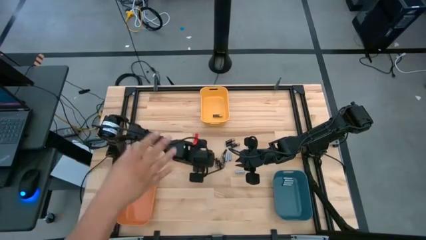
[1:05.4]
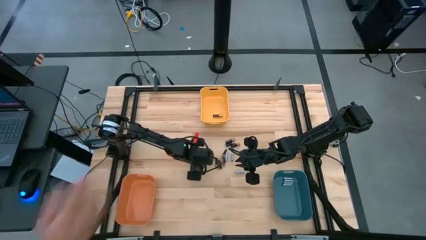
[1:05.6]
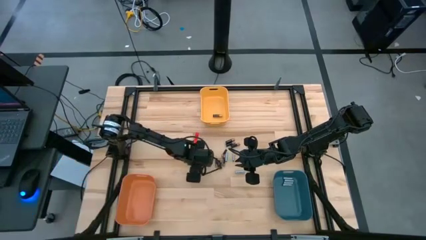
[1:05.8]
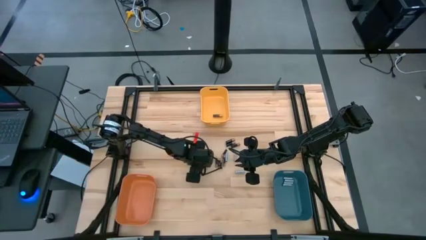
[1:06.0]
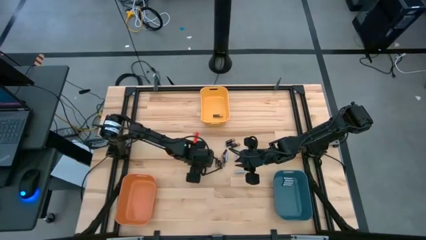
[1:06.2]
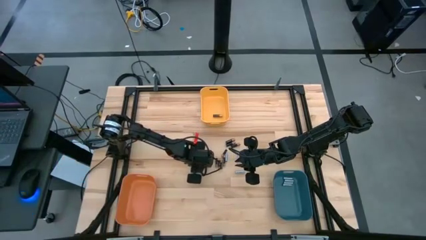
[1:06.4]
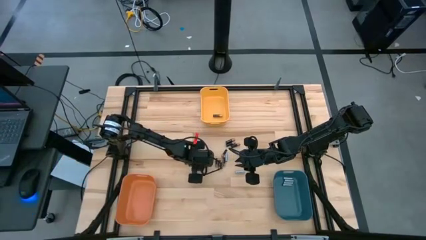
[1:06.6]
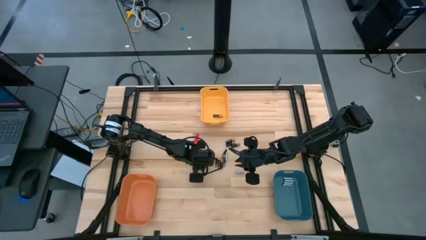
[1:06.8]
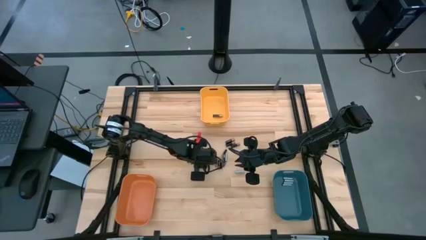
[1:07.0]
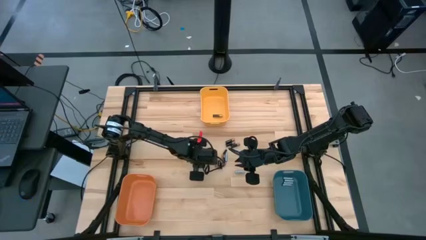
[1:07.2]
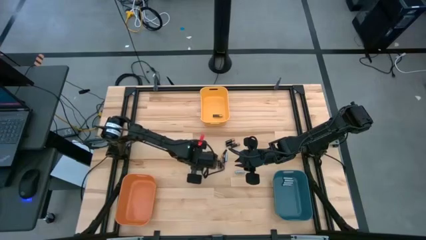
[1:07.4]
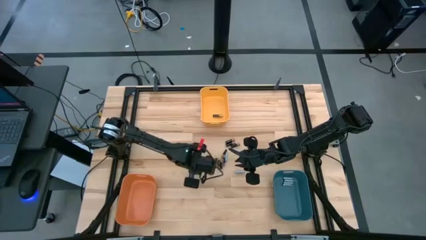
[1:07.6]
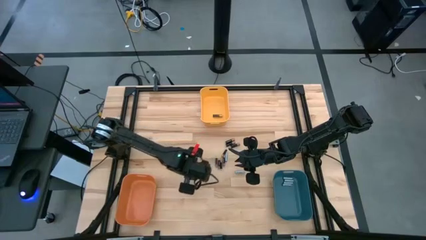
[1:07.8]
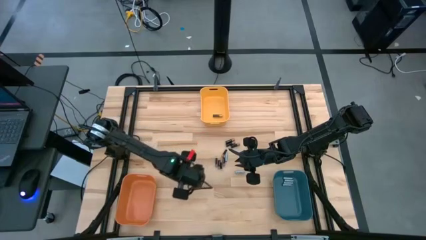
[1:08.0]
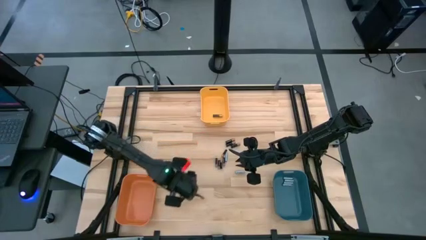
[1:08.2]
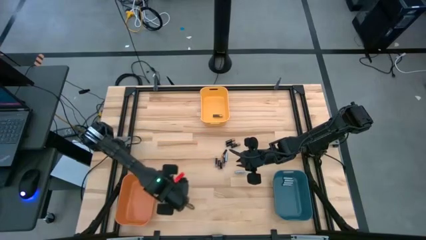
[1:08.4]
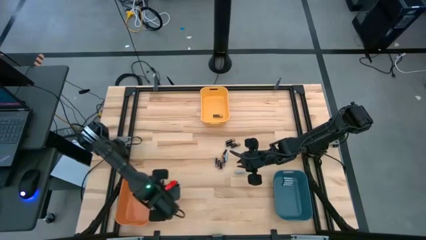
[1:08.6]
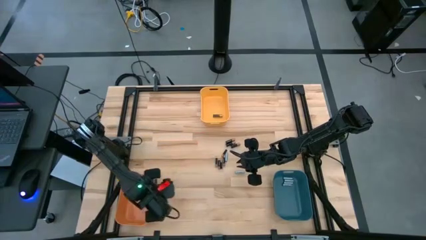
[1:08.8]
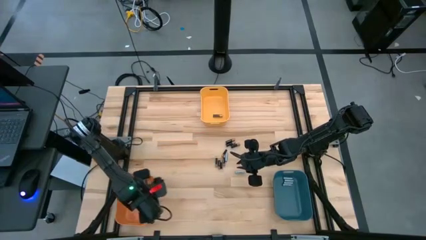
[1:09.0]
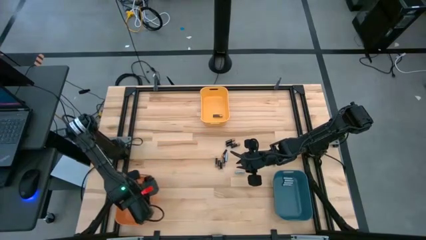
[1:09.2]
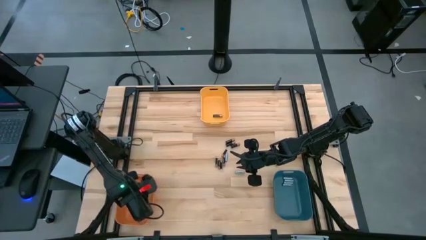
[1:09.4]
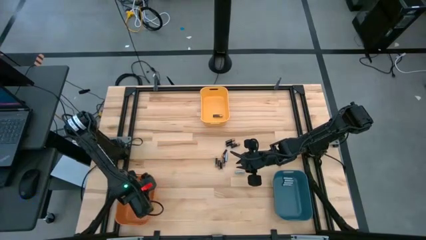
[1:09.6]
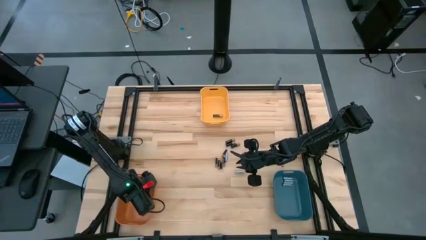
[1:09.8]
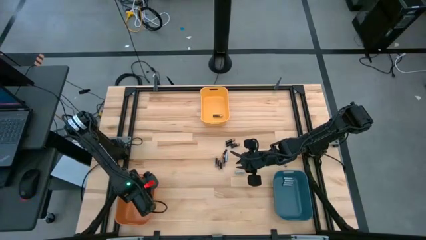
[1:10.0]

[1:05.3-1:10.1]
Task: Sort batteries
Put the small black battery into the yellow bin

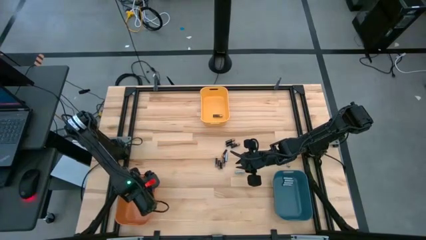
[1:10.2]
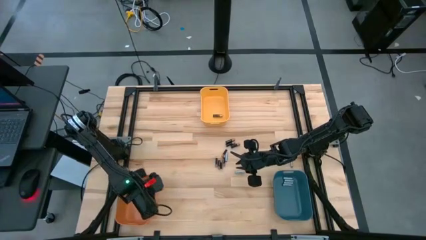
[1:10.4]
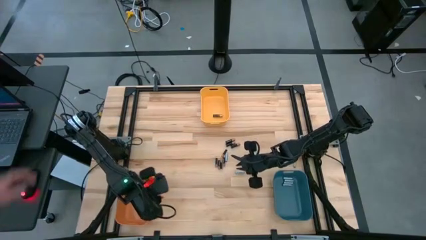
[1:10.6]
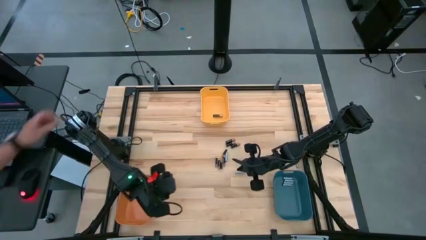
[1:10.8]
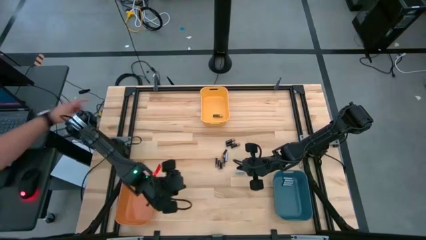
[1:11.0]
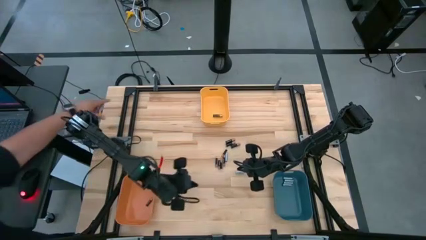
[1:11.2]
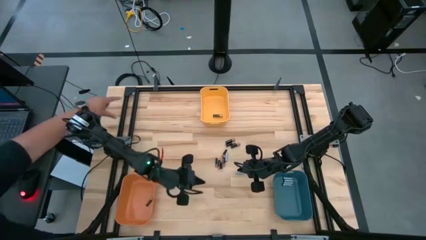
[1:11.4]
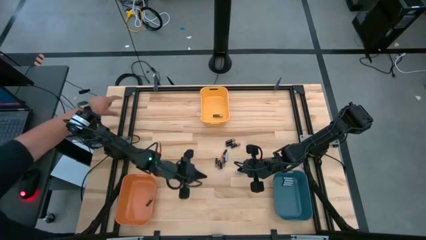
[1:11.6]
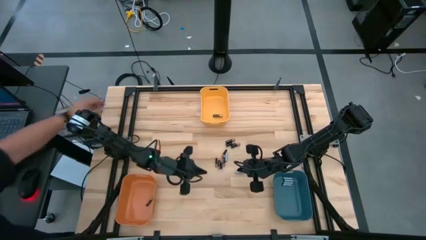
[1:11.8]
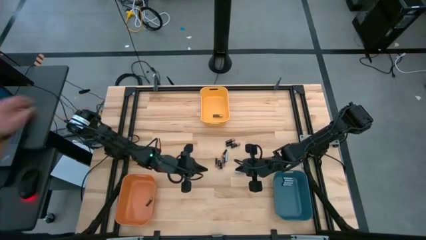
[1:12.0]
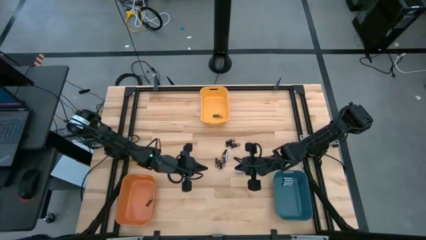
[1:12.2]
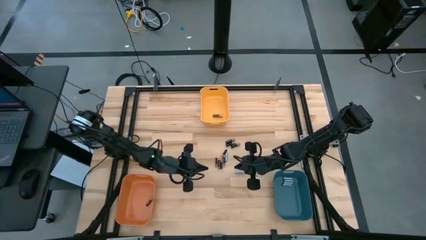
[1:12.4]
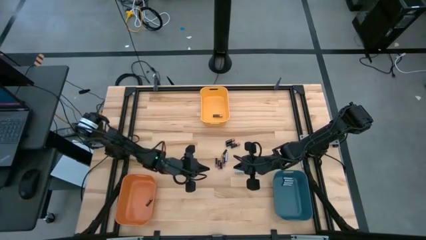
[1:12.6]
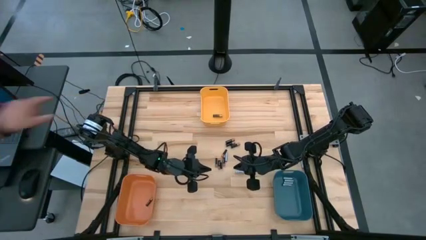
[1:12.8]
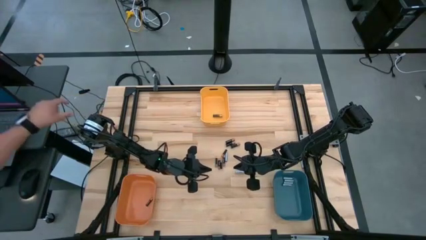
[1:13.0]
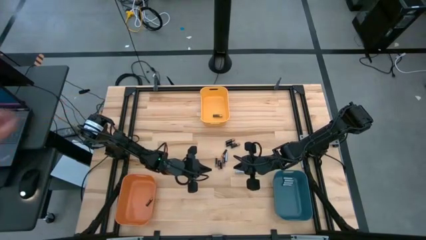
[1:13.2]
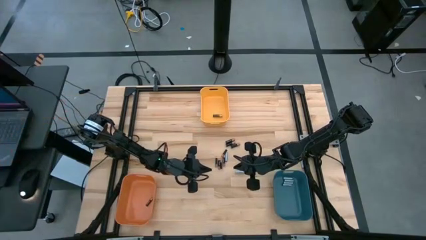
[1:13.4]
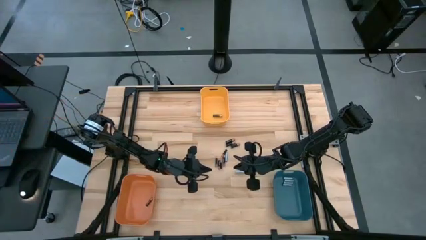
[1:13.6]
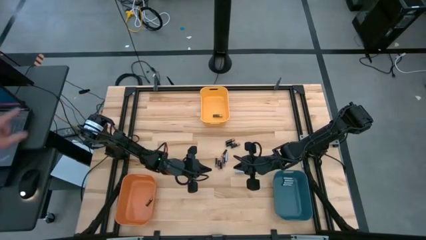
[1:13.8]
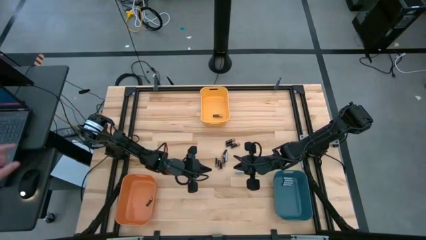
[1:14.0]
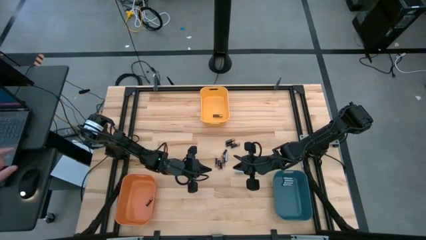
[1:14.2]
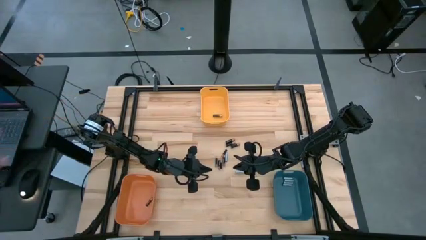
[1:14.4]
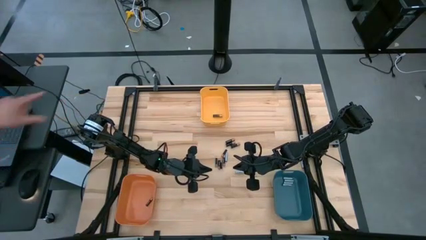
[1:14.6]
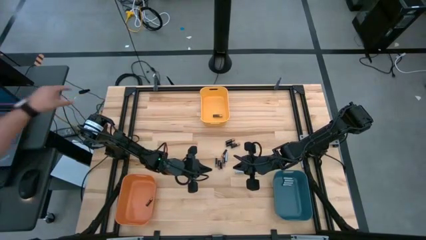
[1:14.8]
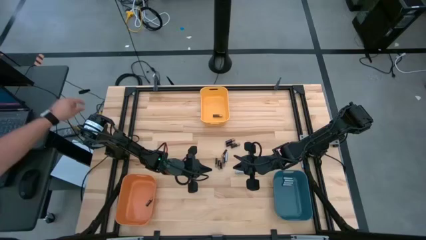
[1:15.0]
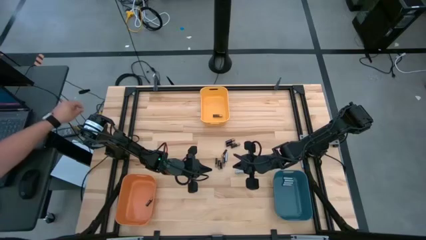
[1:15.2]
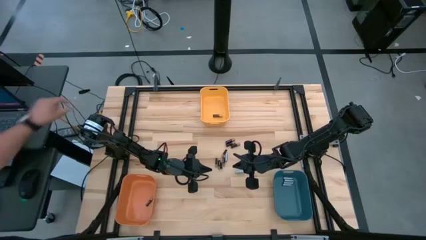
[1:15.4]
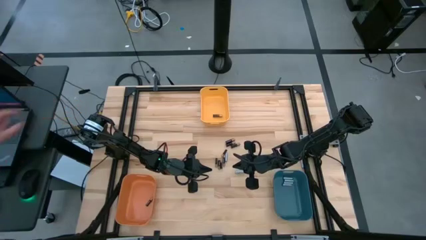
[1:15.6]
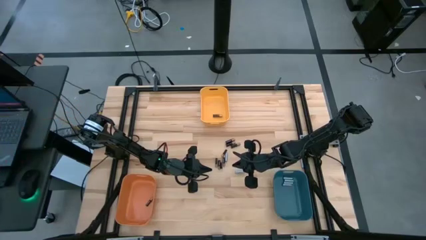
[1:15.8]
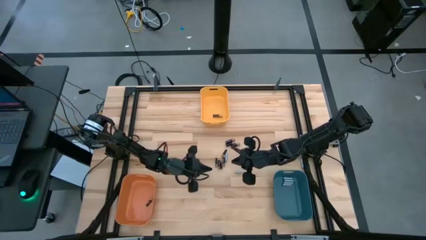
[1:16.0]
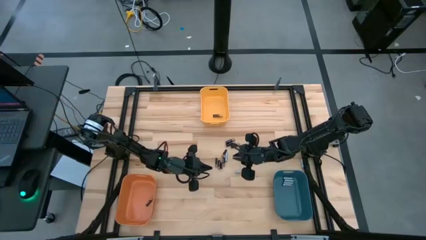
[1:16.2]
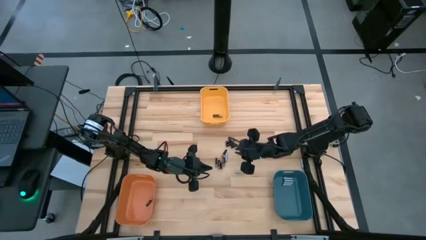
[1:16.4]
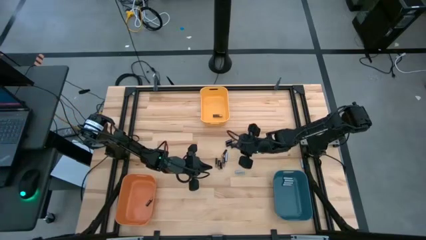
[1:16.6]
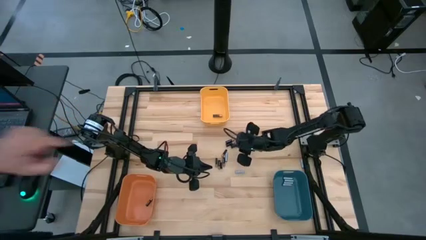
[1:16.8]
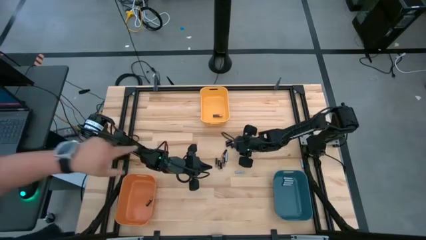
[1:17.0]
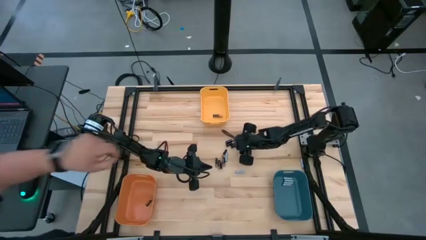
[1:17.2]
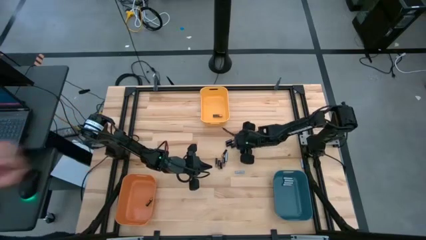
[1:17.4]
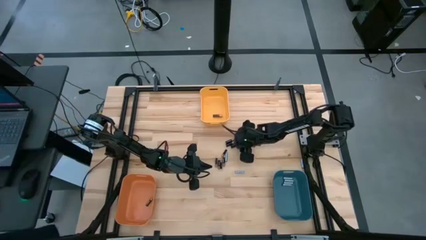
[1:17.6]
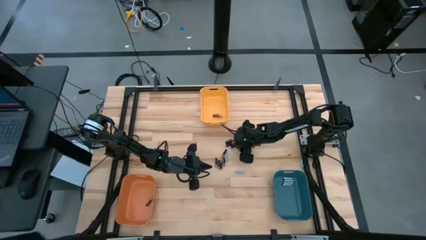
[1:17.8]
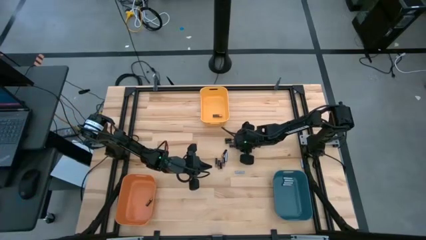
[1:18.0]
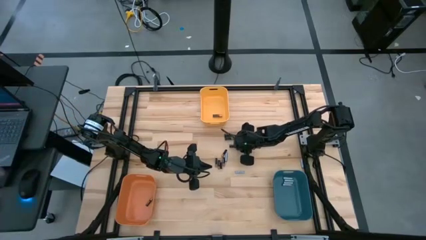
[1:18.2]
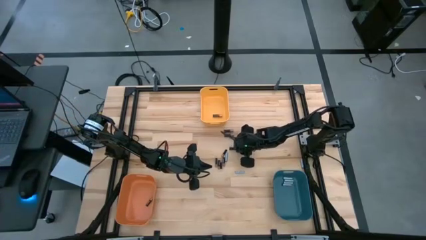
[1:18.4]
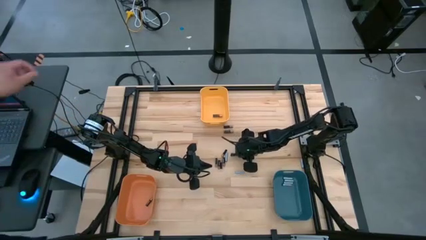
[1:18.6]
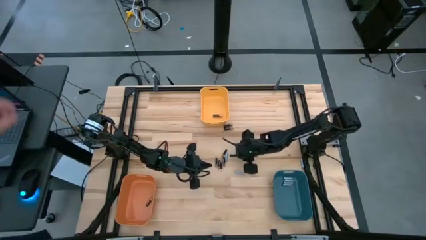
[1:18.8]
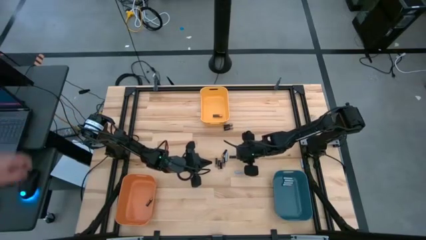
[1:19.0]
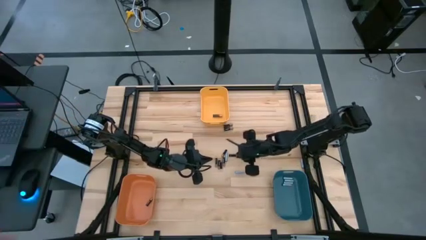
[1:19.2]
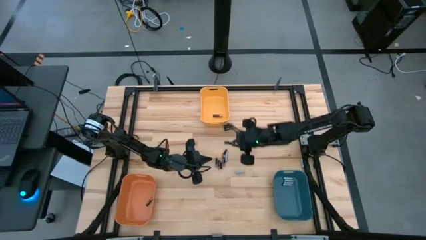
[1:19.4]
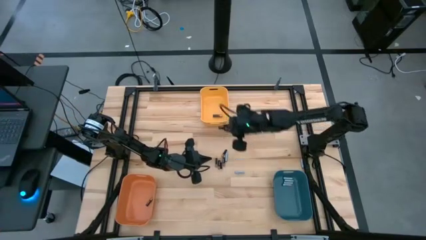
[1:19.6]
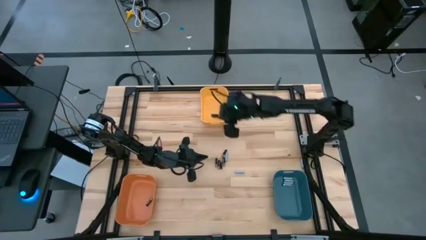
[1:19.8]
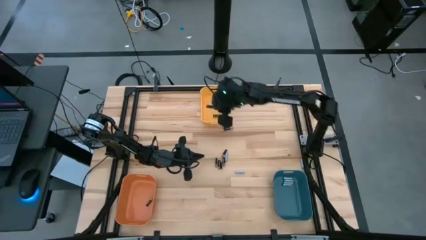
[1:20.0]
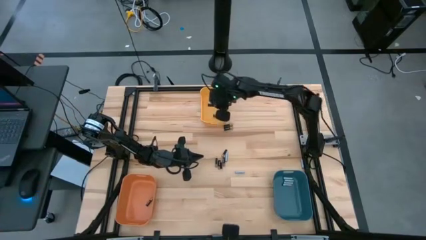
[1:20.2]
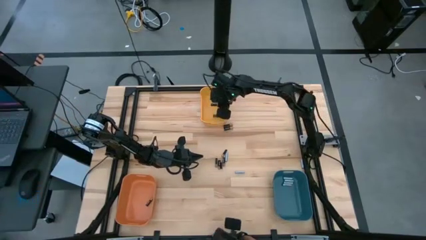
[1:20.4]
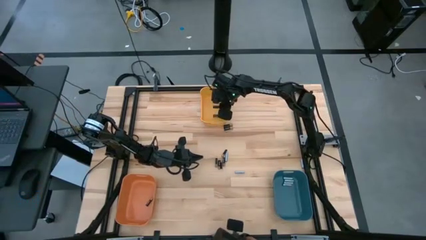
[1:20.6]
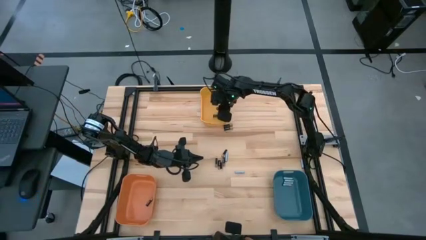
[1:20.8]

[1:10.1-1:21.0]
Put the large black battery into the yellow bin

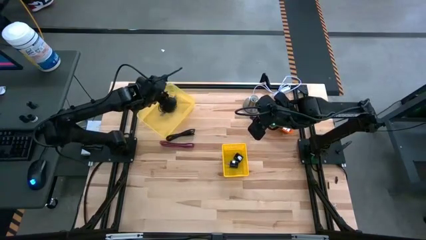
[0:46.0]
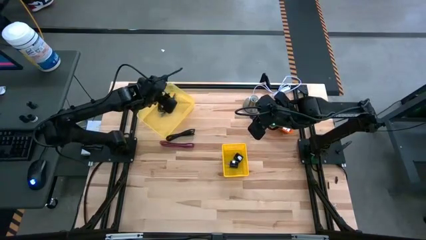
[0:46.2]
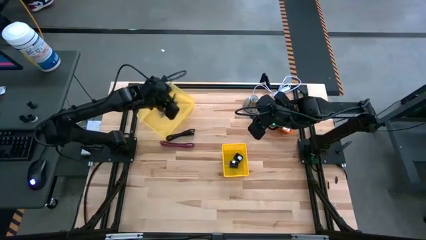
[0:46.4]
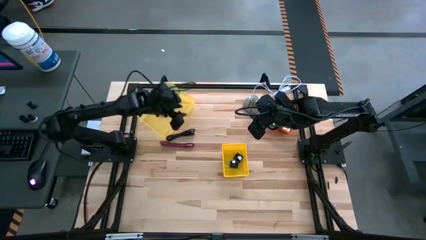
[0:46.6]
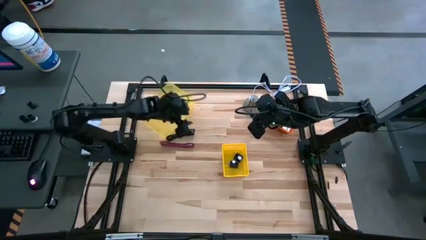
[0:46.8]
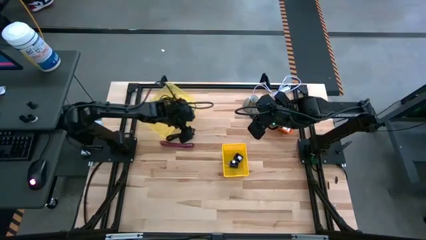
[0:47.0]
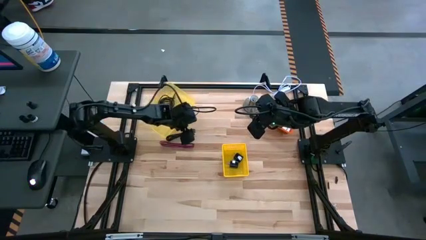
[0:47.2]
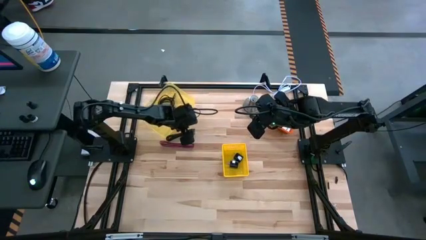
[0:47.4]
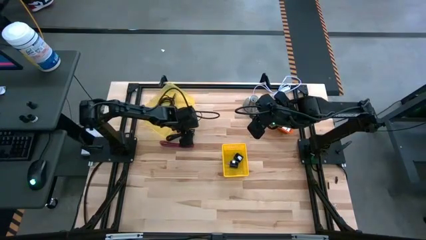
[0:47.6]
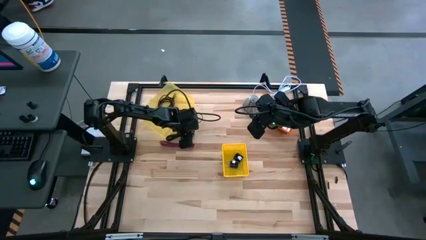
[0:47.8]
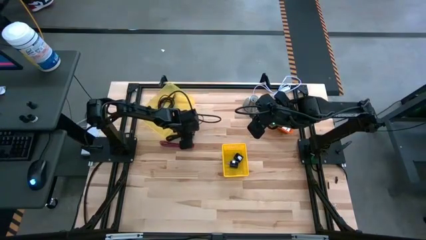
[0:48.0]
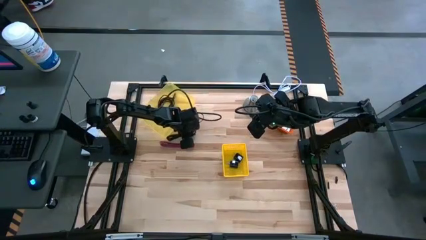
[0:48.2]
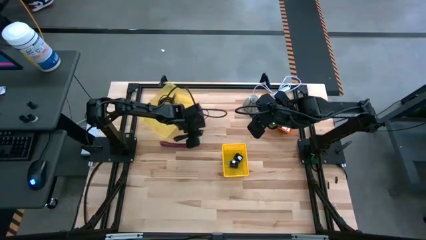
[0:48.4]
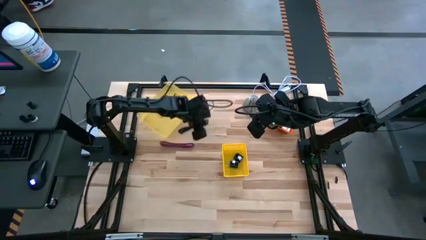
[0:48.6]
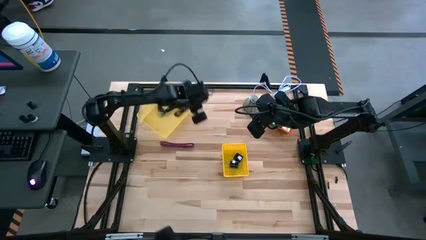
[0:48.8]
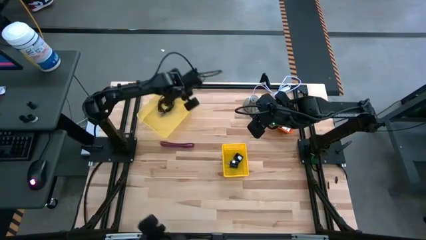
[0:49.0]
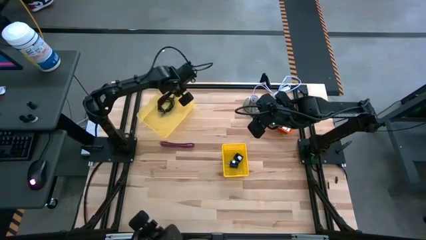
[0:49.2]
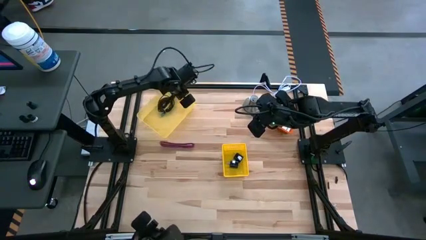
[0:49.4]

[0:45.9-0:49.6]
Task: Pick and place items into bin
Put the black charger cable into the light yellow bin
